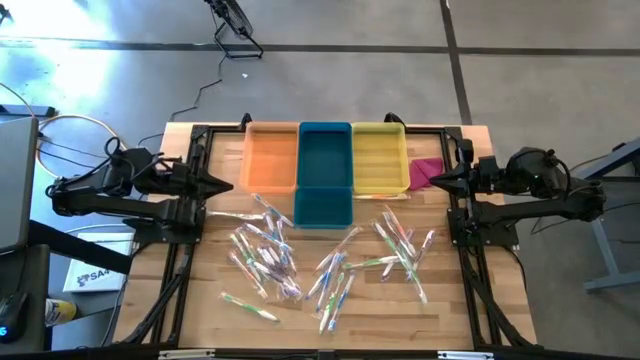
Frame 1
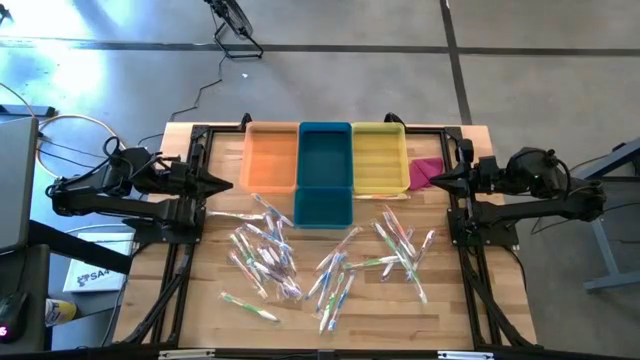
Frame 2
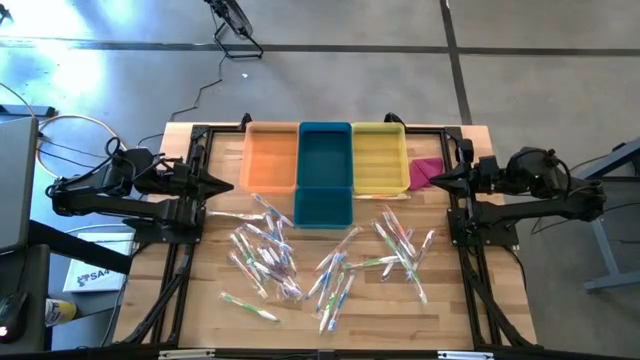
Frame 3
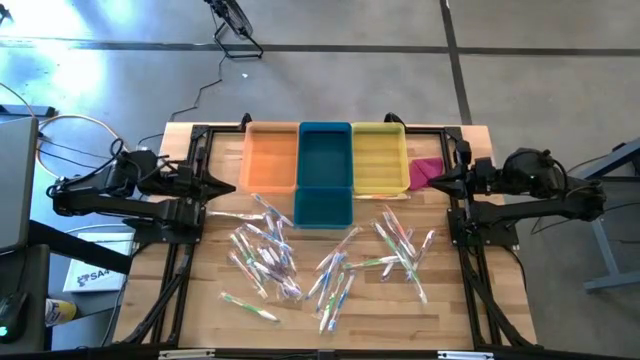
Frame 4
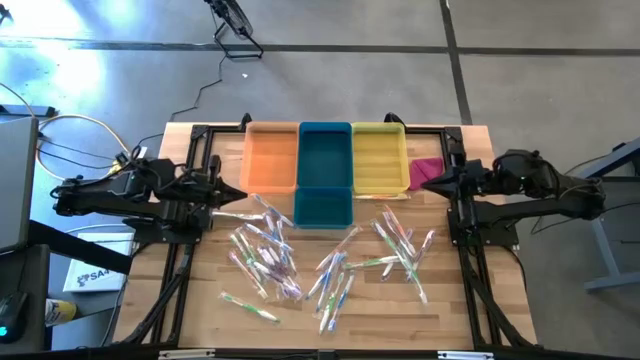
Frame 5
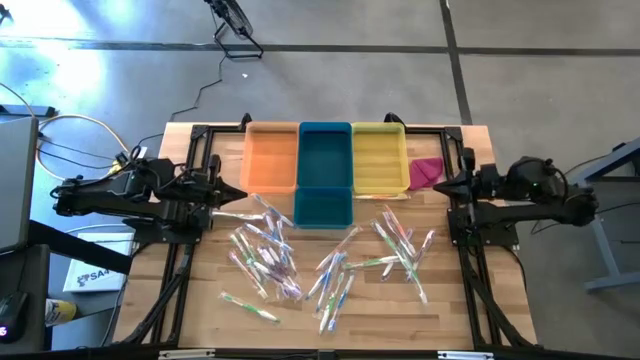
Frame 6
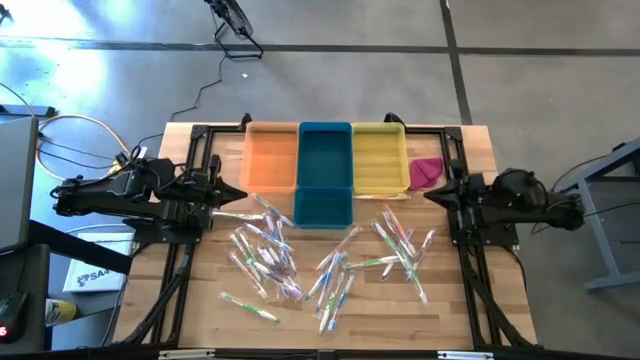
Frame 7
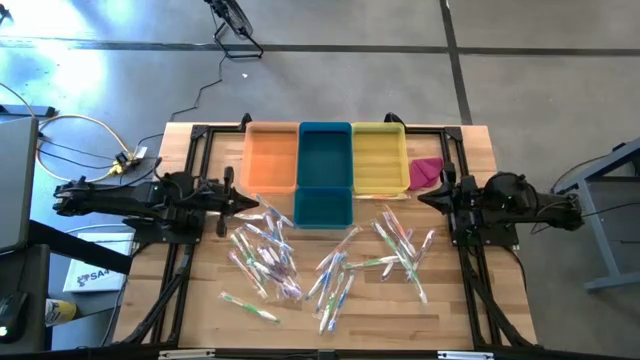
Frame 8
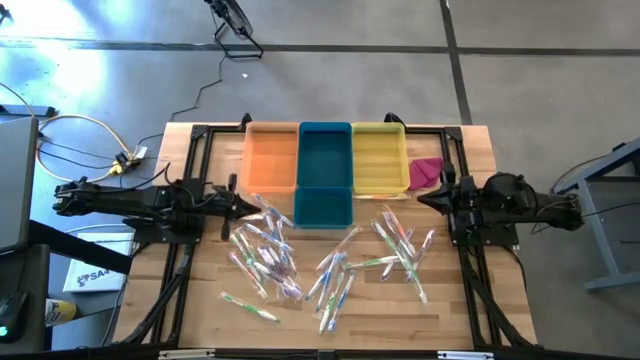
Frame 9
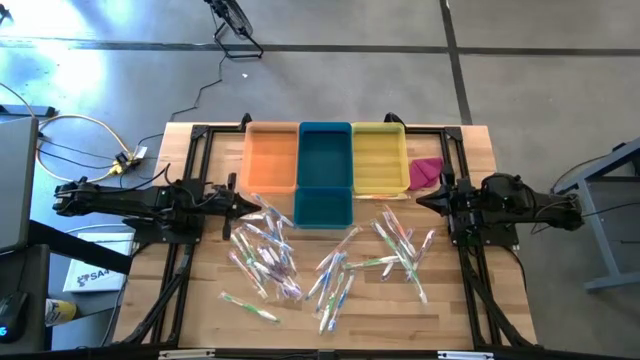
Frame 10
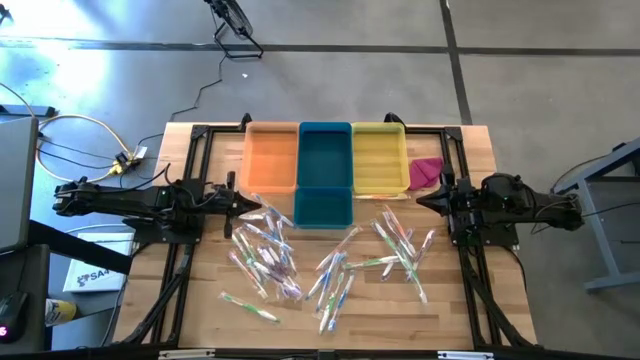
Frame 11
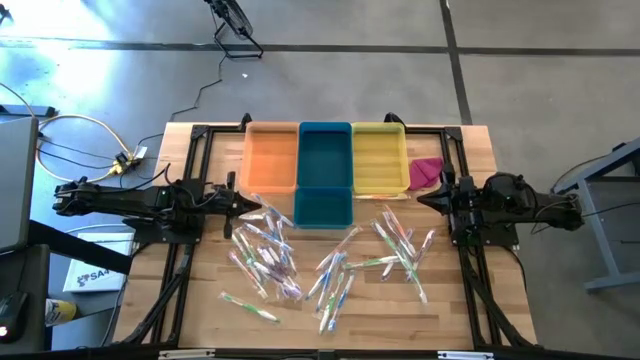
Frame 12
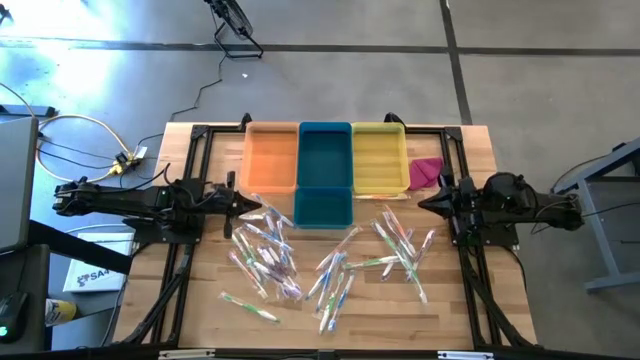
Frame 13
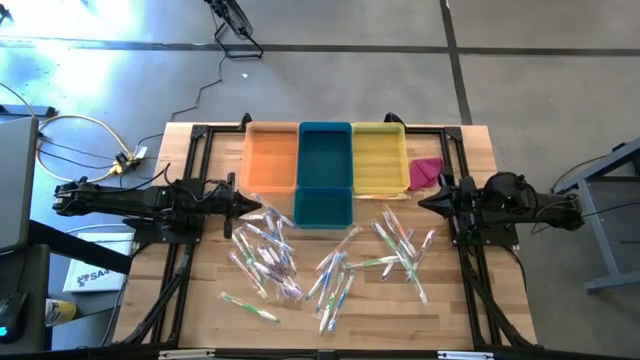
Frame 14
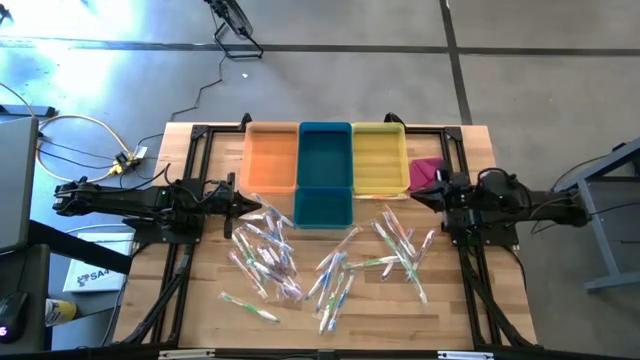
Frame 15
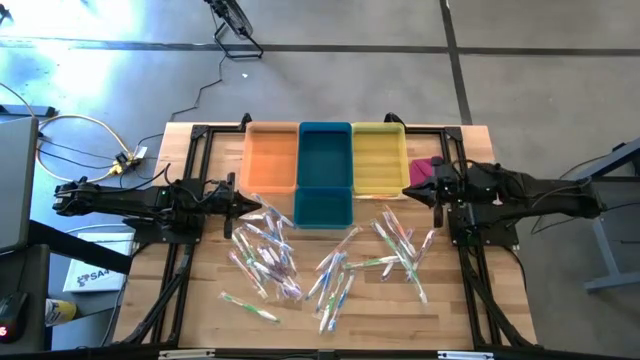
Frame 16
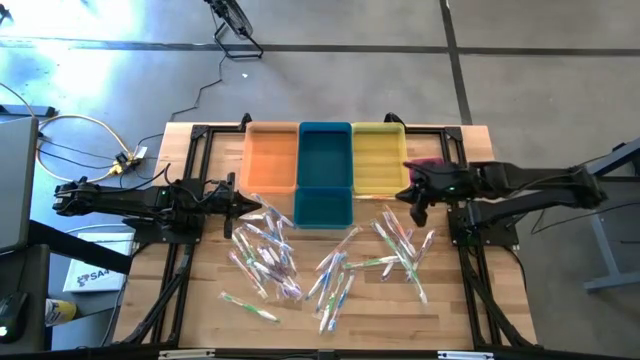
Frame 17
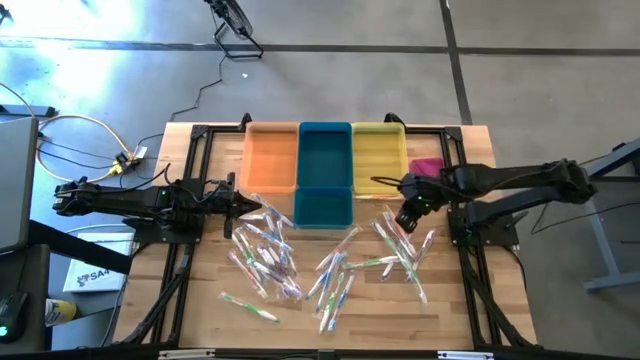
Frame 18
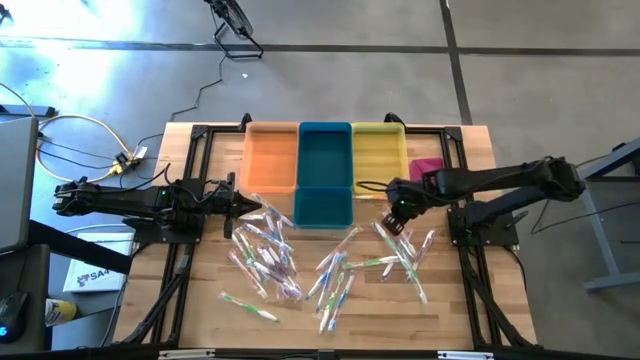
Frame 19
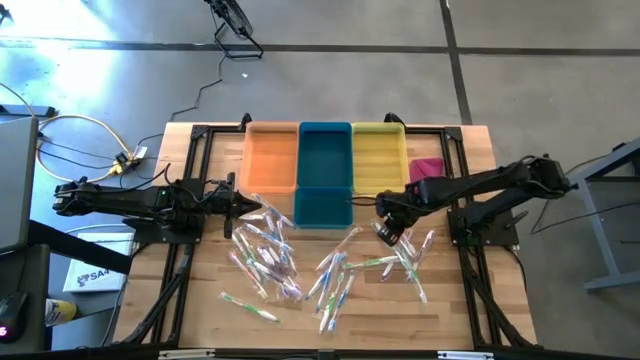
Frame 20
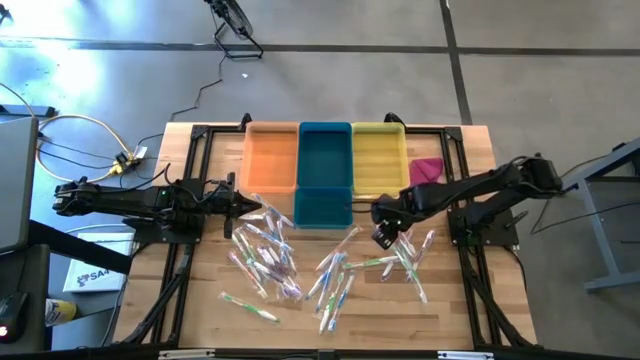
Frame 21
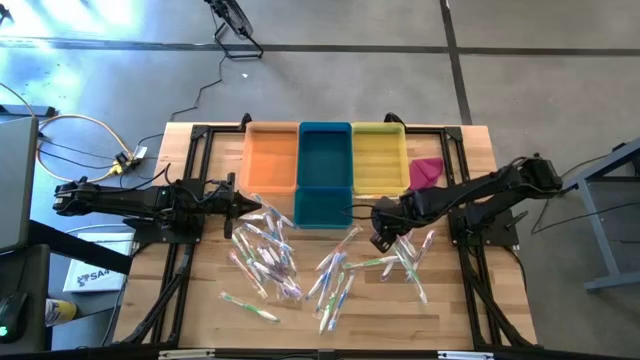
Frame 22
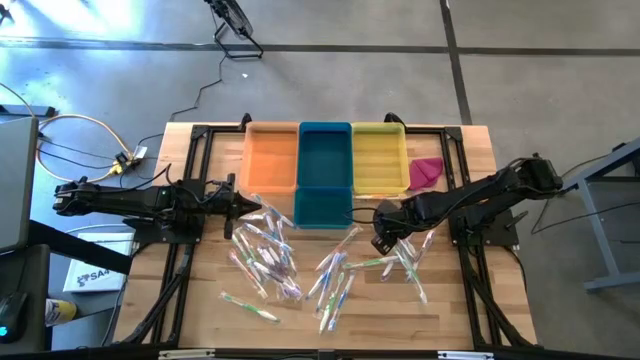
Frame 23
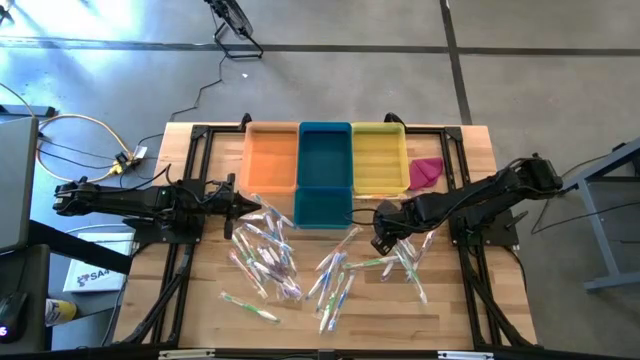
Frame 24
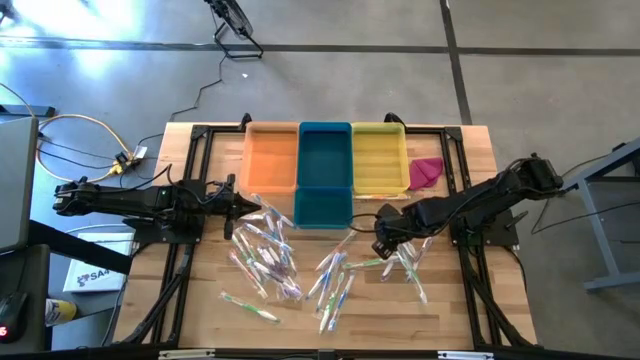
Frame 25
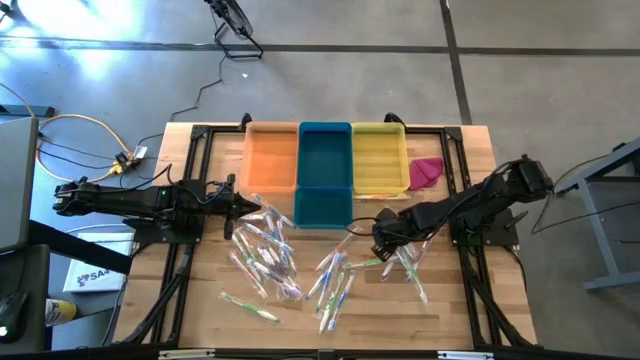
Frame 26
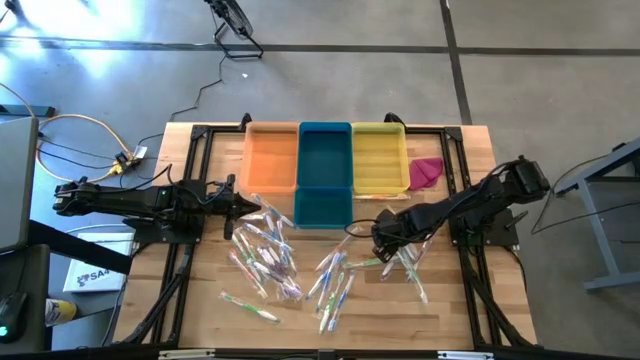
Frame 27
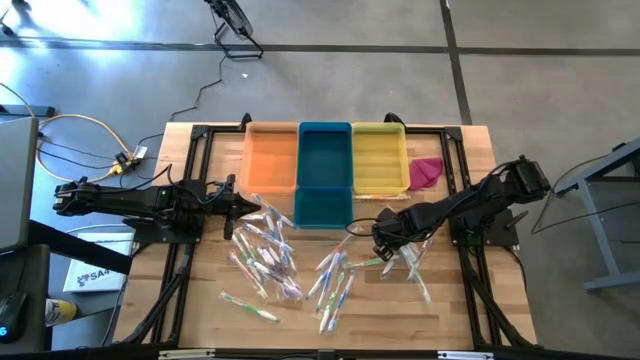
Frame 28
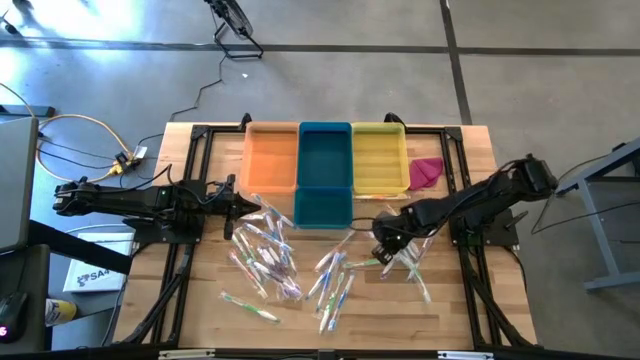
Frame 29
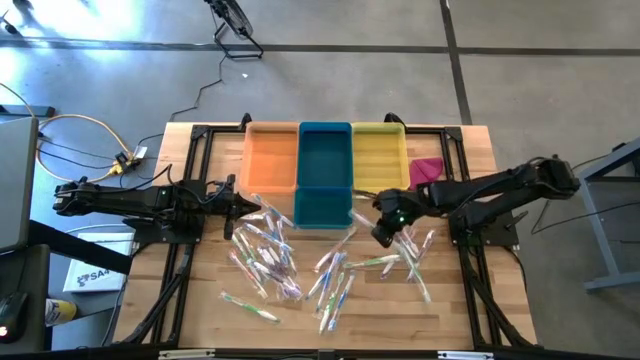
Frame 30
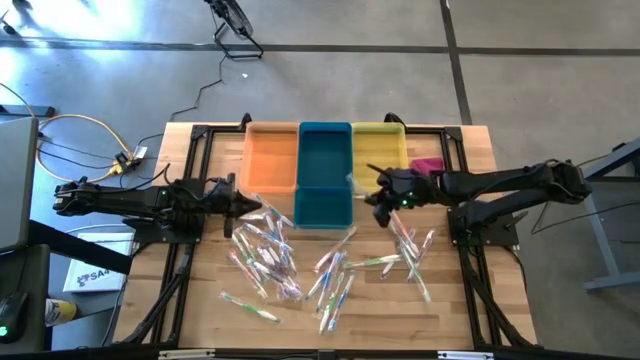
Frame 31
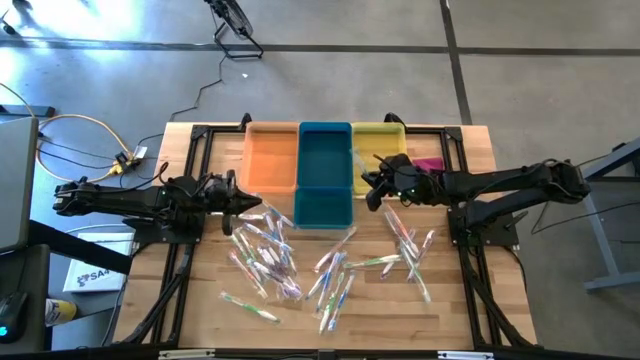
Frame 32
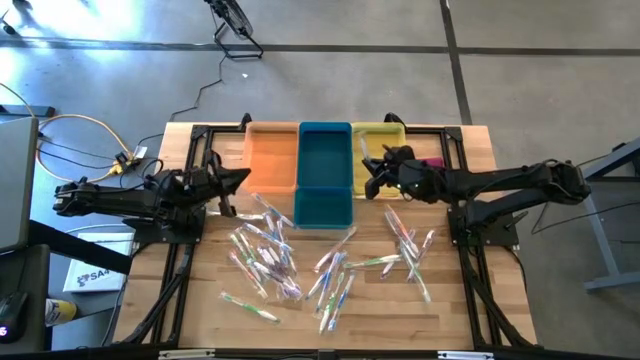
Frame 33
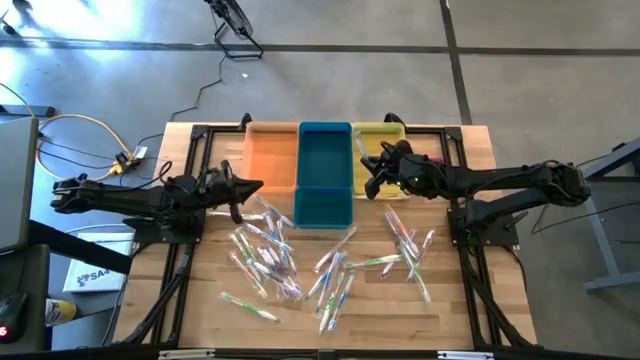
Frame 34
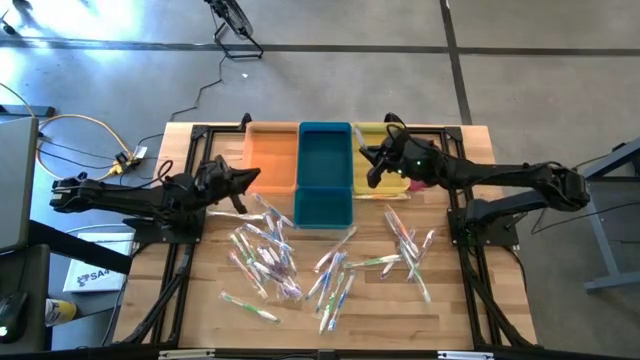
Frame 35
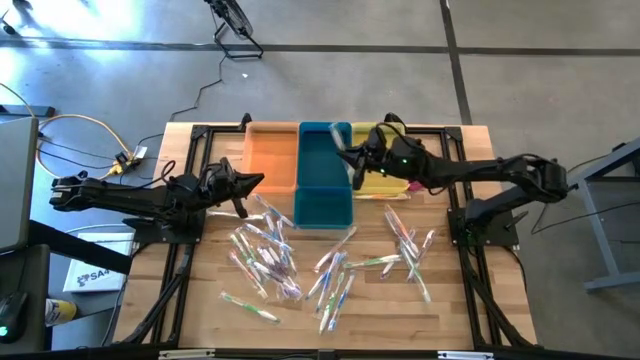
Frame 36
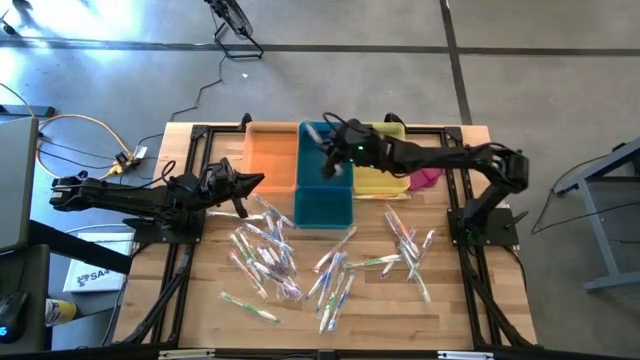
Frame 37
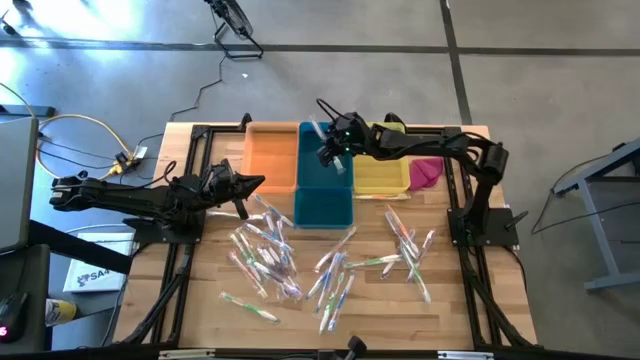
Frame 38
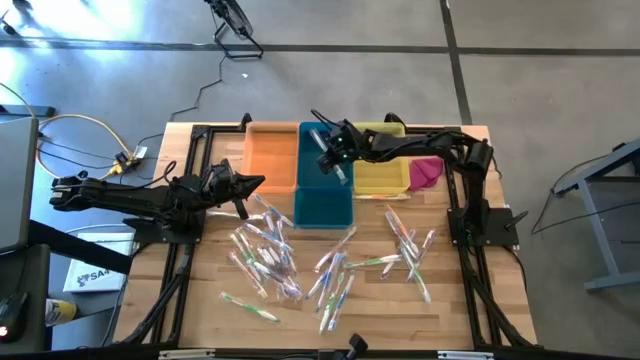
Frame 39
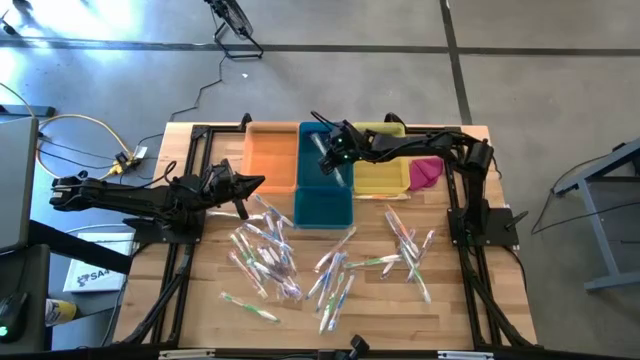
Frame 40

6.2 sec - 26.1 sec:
Task: Pick & Place Toothbrushes
Put the green toothbrush into the top blue bin
